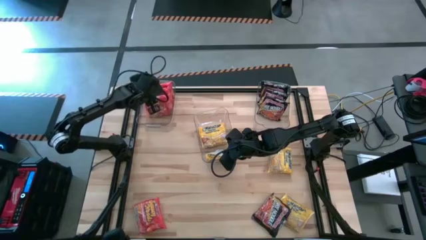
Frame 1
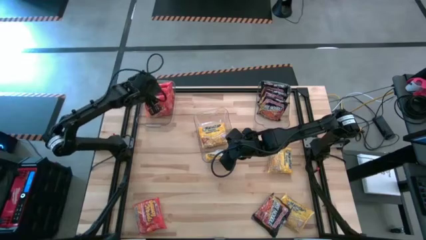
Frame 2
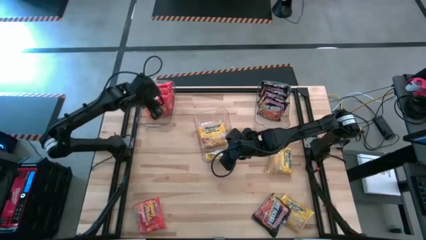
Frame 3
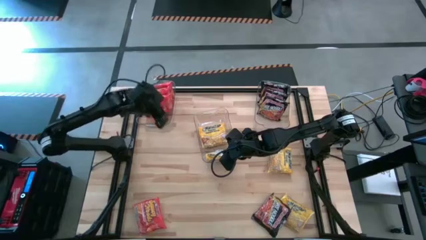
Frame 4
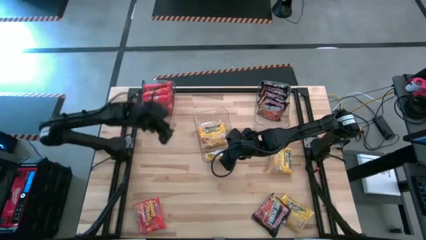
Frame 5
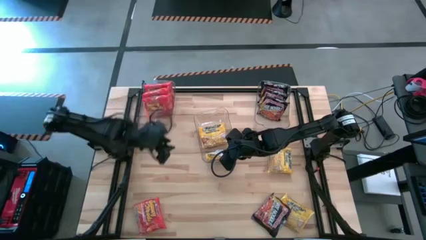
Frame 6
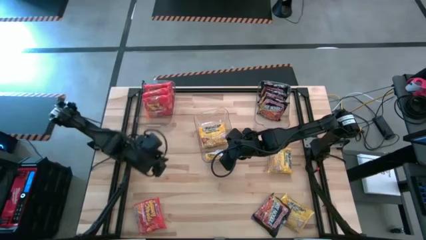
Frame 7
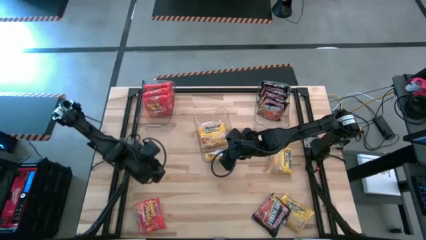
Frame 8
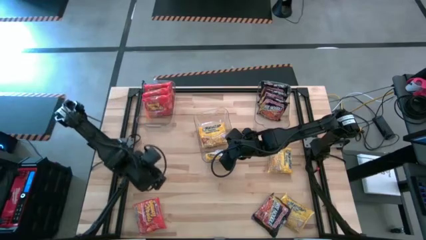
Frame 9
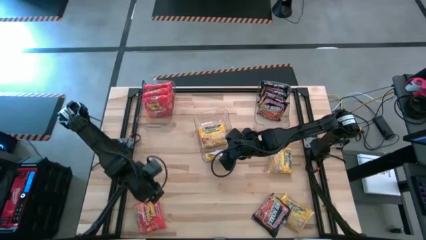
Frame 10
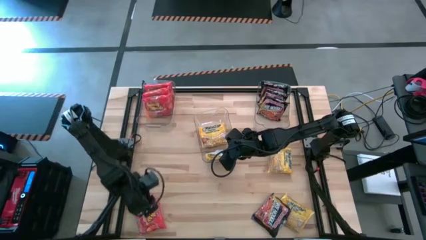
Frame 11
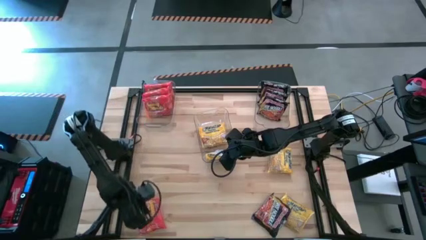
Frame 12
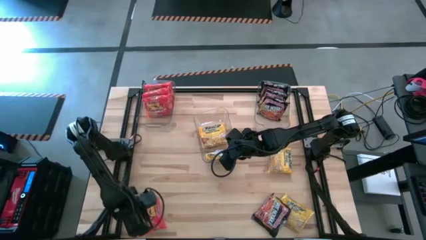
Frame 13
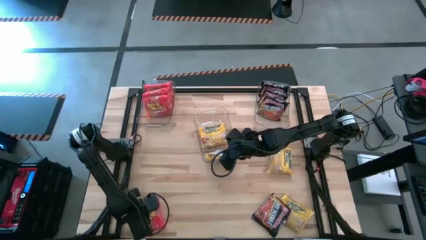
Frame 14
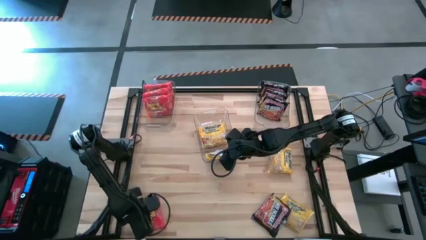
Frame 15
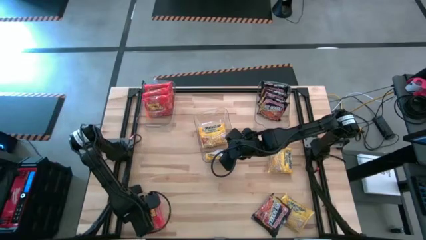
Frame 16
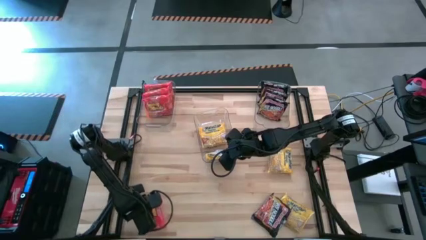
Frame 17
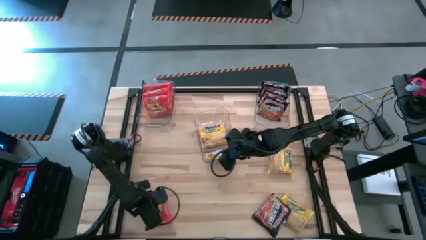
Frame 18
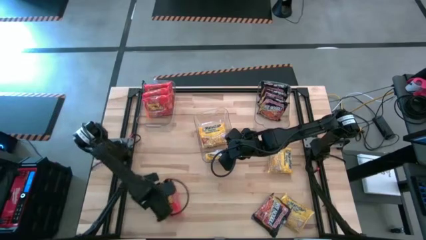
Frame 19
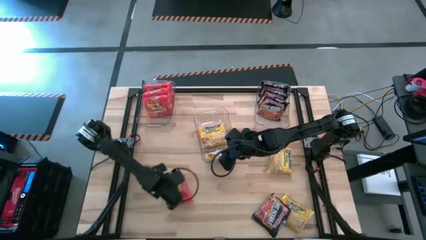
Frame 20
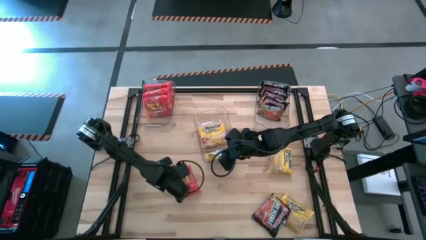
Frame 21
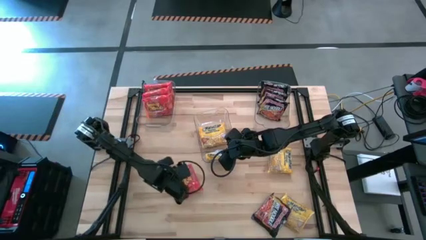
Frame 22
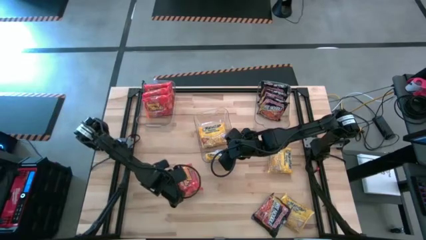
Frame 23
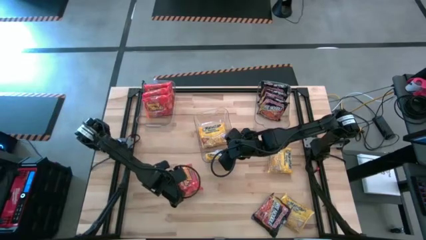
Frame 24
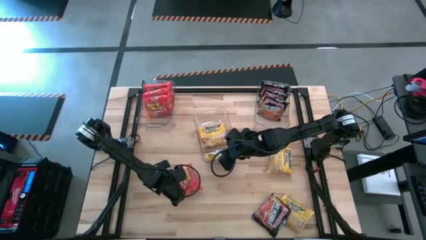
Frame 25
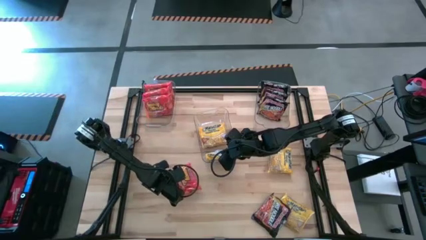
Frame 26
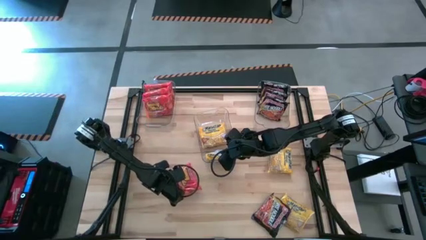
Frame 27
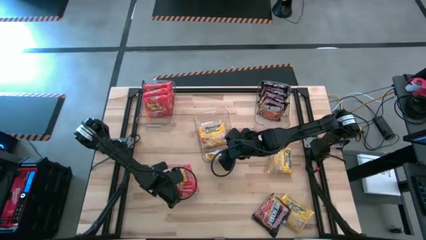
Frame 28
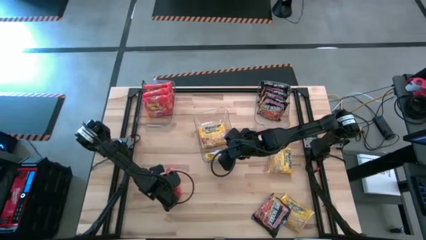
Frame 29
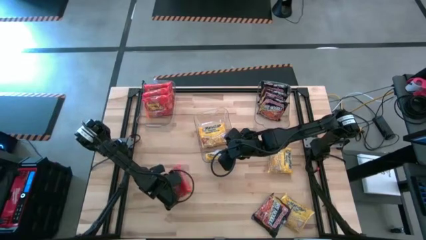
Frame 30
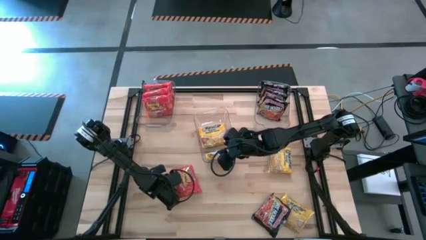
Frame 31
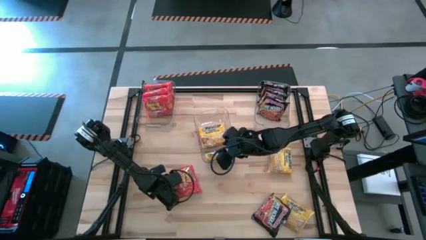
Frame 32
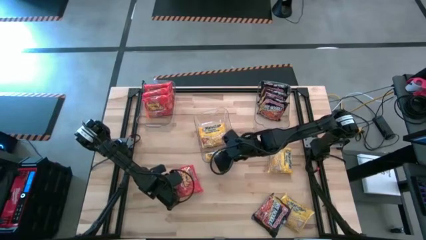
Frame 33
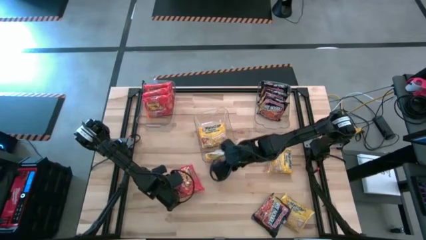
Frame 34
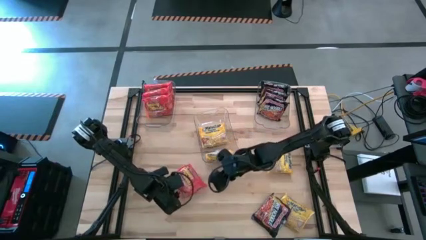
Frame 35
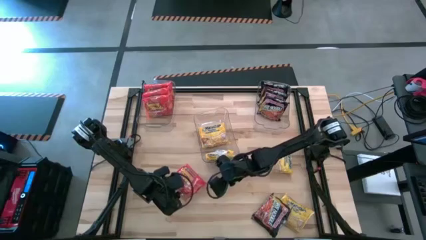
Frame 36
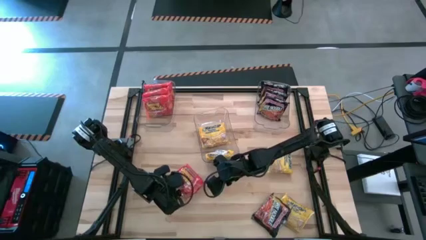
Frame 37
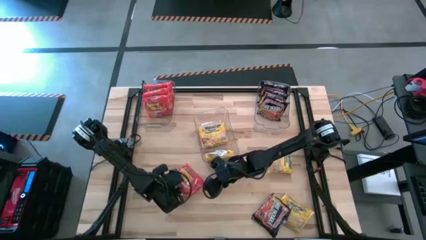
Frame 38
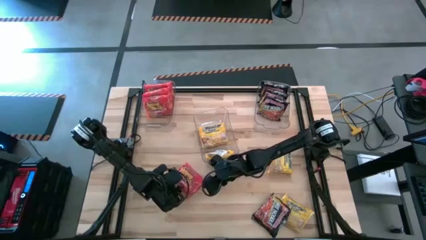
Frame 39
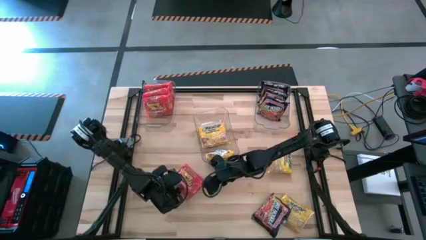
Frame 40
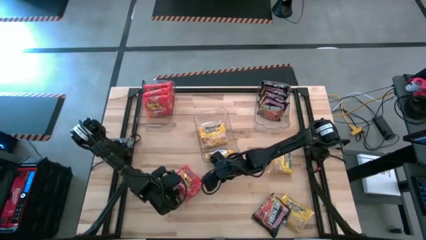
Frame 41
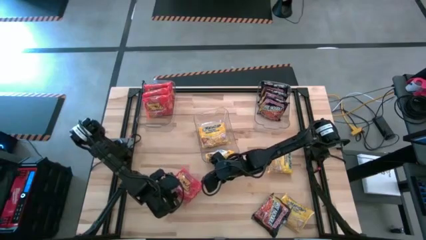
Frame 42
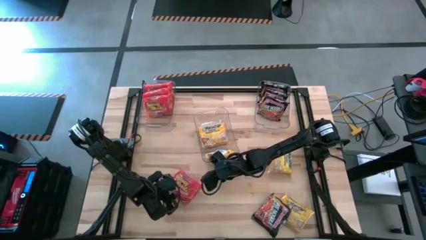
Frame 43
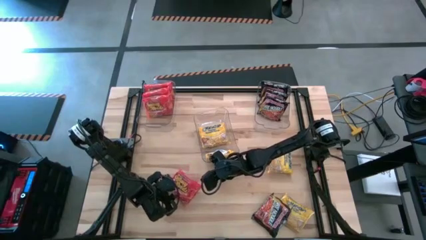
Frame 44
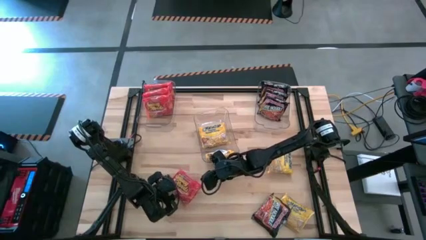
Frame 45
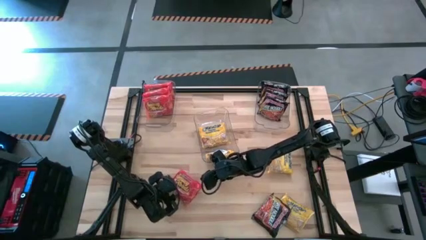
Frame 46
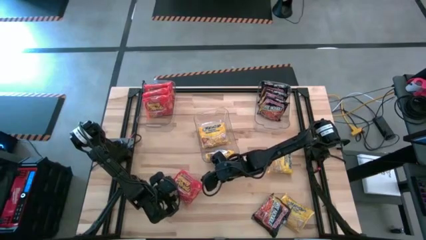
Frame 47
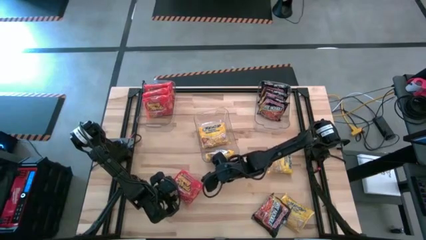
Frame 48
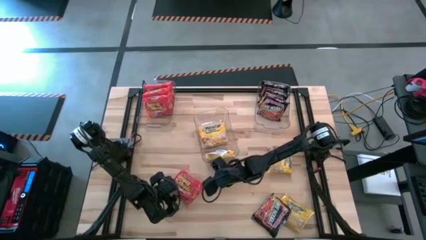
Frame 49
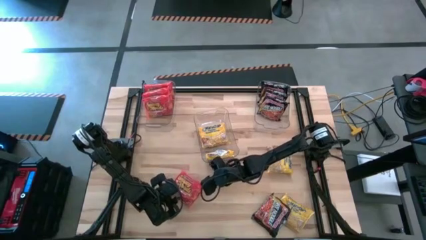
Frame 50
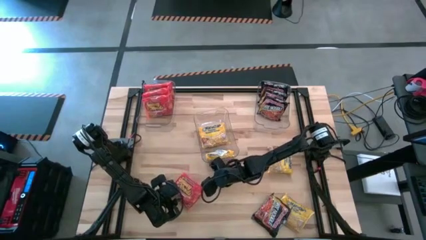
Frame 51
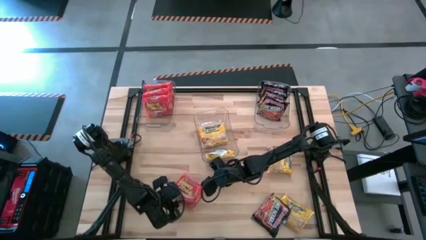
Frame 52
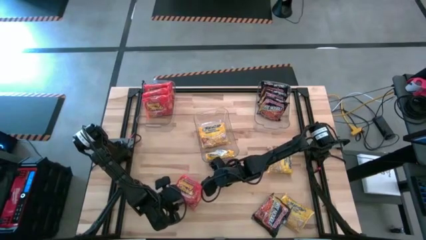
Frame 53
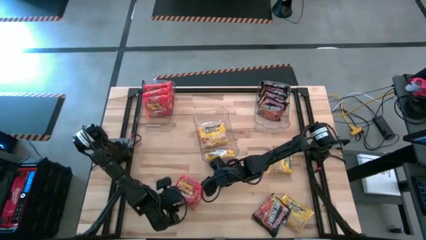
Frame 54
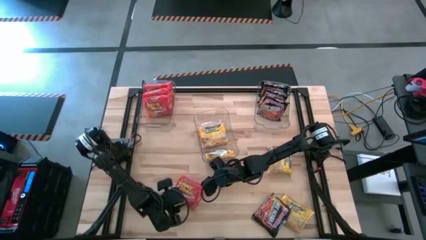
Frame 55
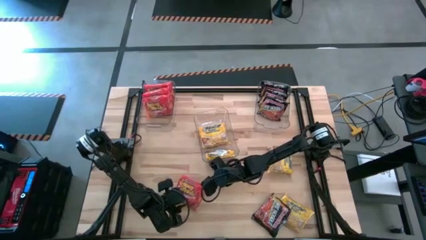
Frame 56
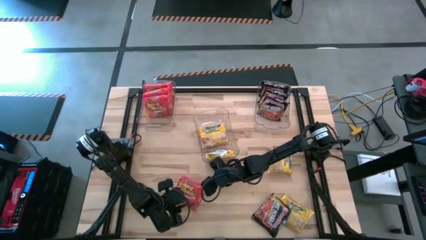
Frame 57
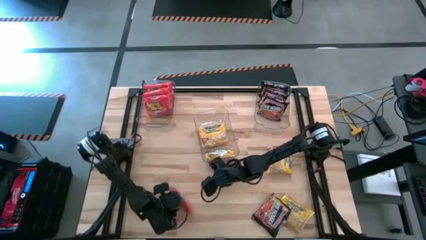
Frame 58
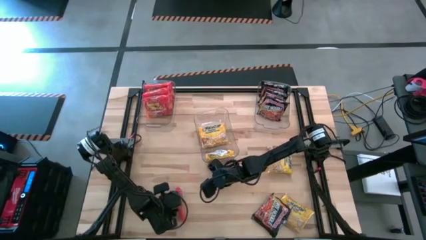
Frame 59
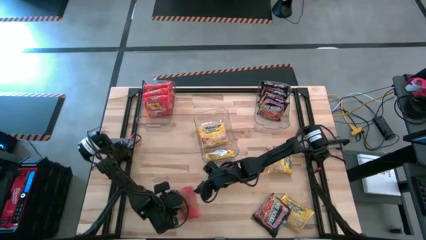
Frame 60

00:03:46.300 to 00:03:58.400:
Task: Sort Maruchan noodles
Put the orange noodle pack into the top left transparent bin

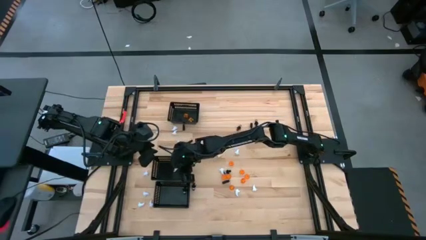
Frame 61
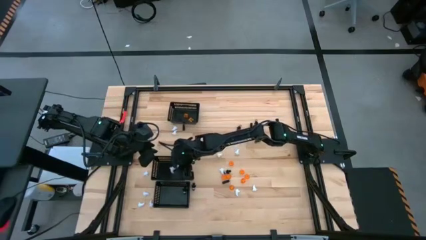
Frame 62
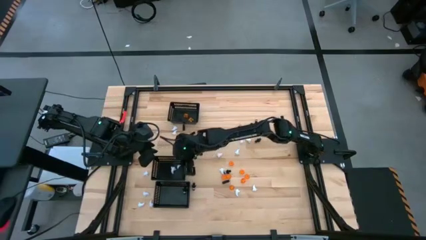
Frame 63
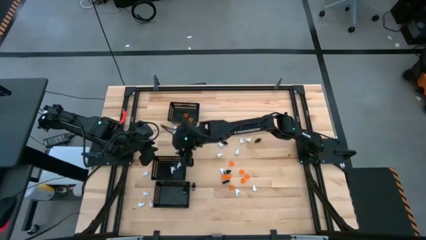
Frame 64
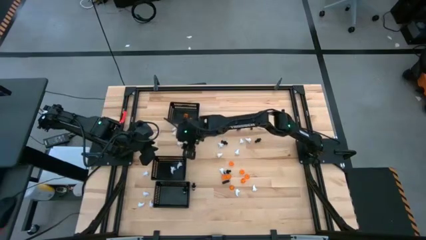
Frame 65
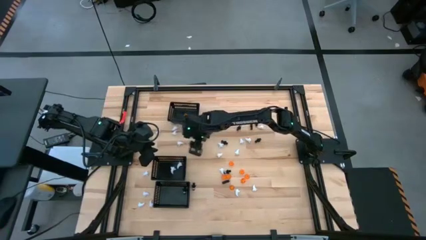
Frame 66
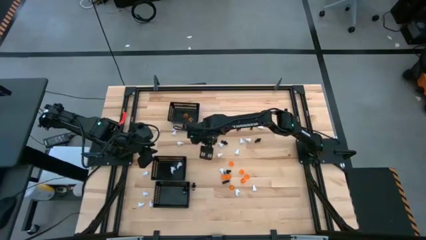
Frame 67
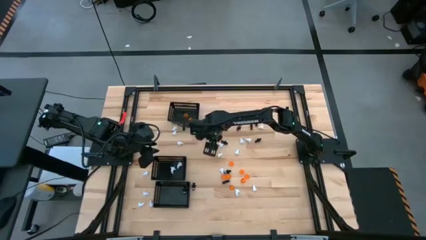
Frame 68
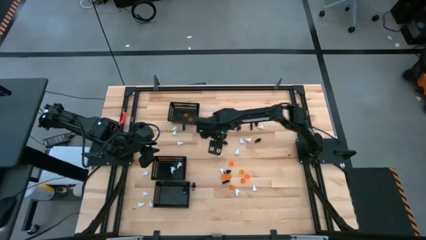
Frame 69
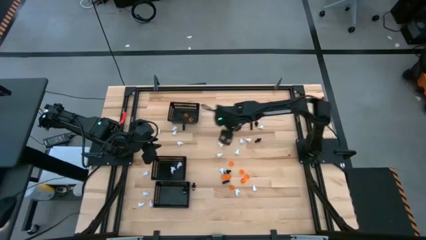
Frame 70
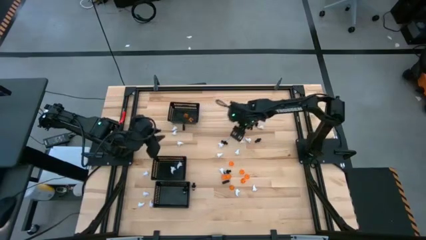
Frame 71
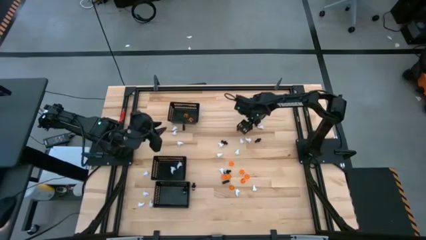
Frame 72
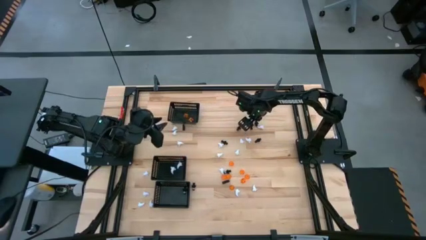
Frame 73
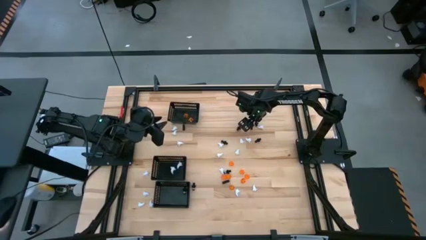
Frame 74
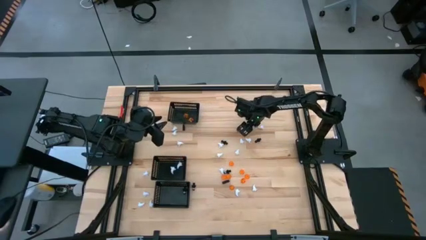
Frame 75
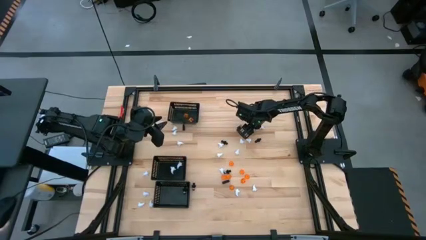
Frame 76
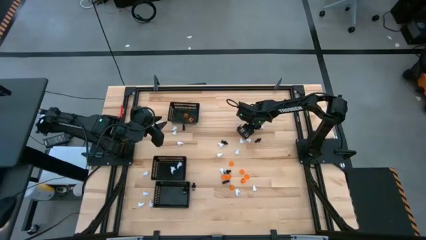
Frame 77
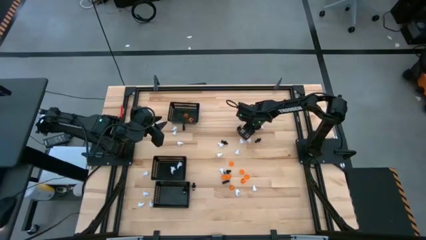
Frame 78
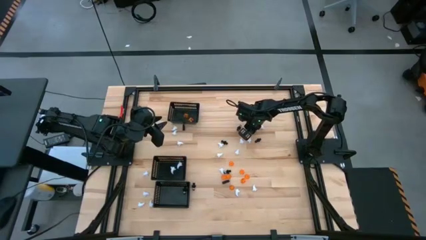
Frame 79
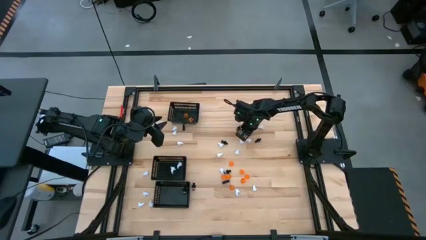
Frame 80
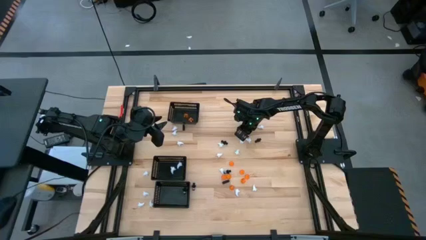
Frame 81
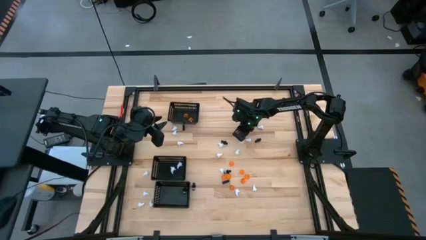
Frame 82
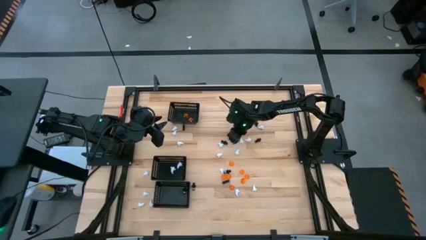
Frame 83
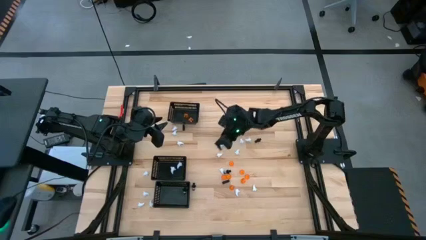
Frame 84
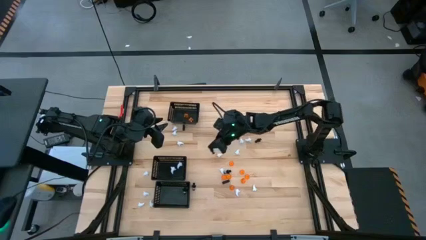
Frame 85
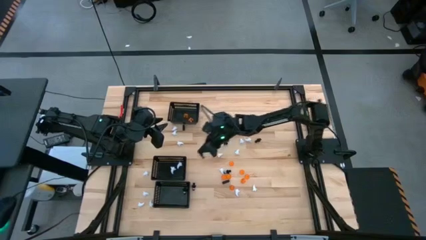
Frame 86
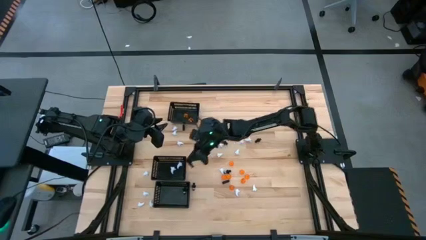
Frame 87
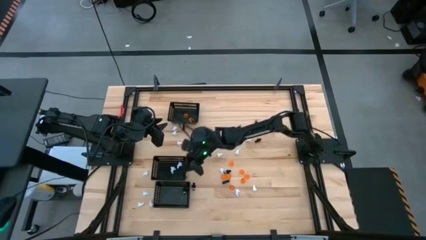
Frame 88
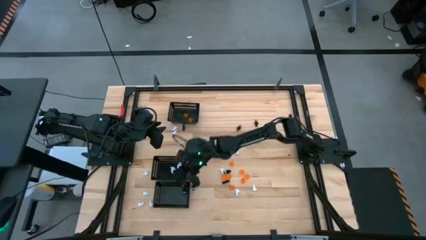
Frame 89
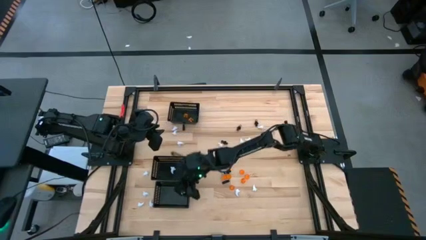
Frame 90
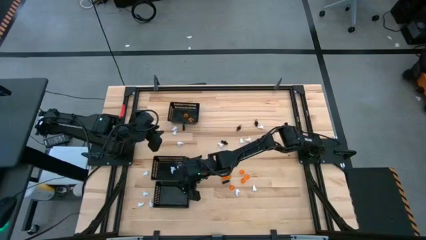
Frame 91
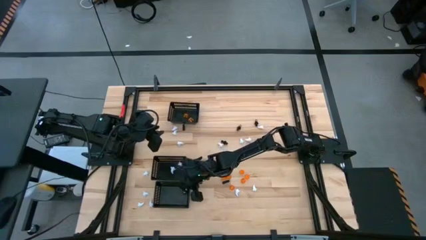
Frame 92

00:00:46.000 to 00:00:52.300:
Task: Sort Halloween decoration
Put the black toy into the bottom black bin
